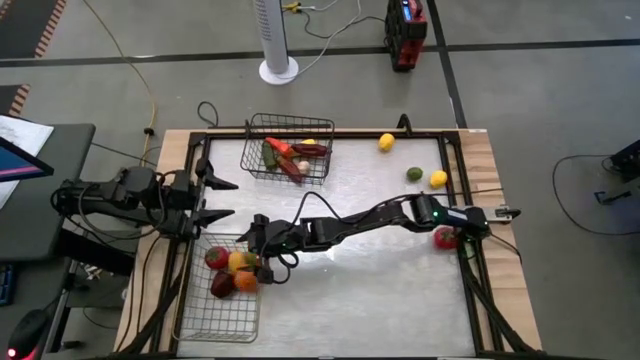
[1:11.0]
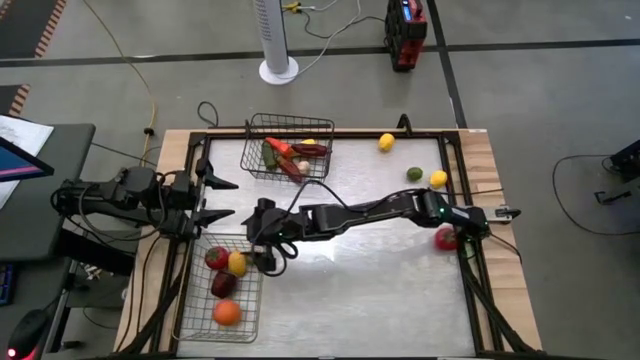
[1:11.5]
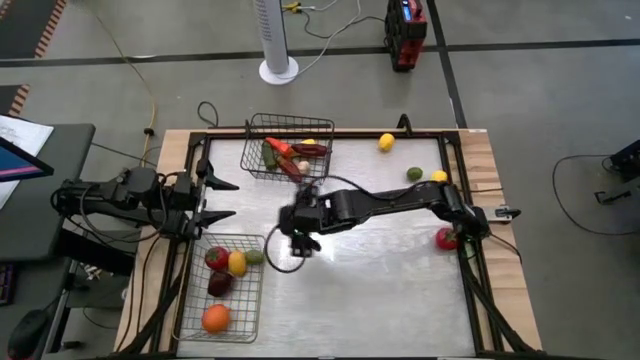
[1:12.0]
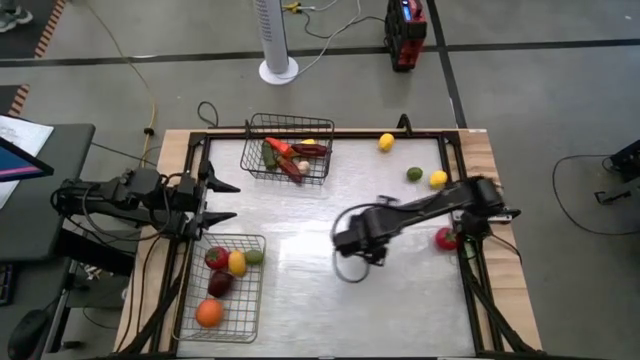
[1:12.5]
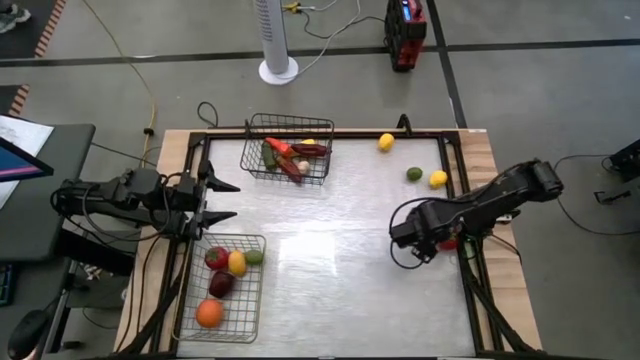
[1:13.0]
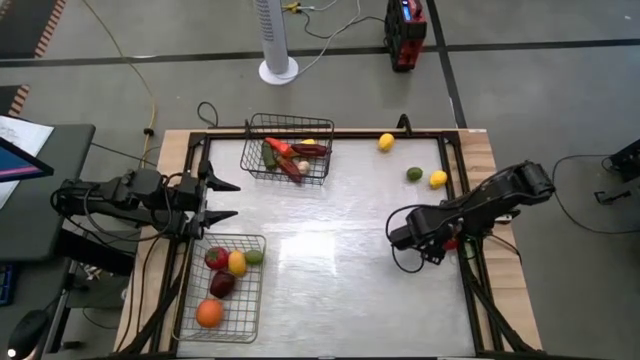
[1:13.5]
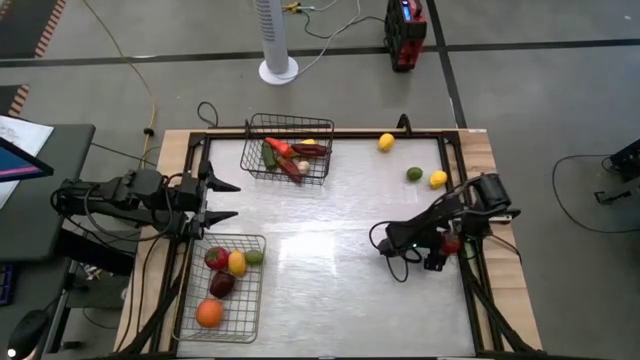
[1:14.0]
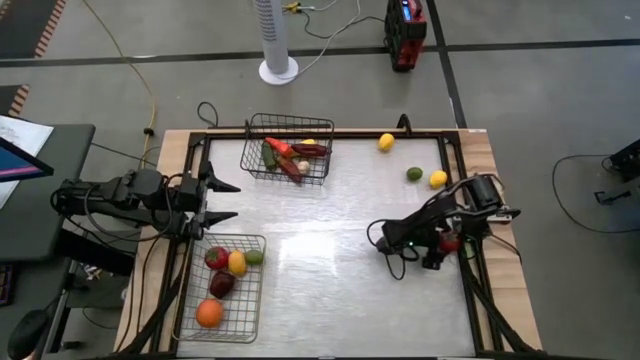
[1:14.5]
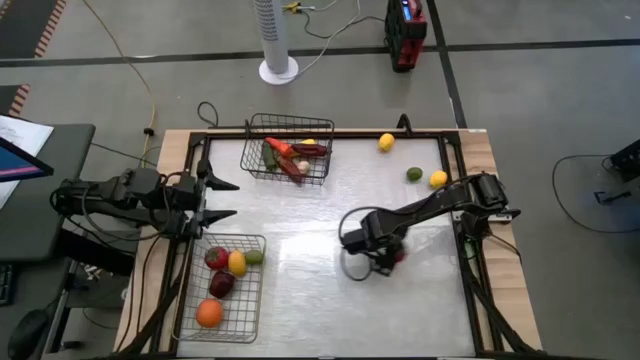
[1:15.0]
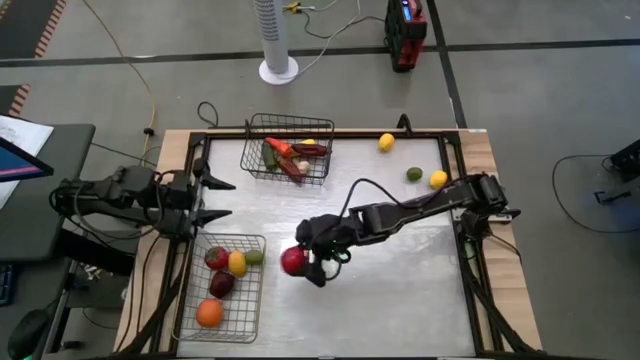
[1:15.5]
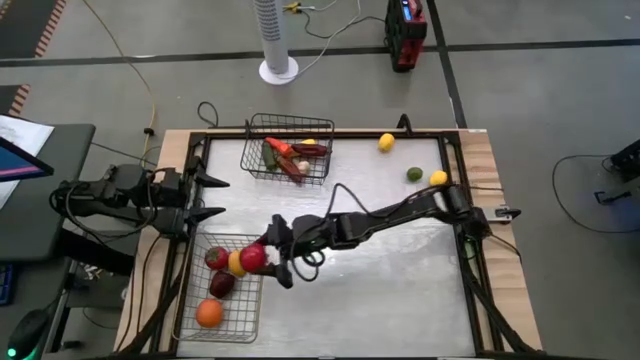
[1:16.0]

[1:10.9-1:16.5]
Task: Sort produce into baskets
Put the red tomato into the silver wire basket

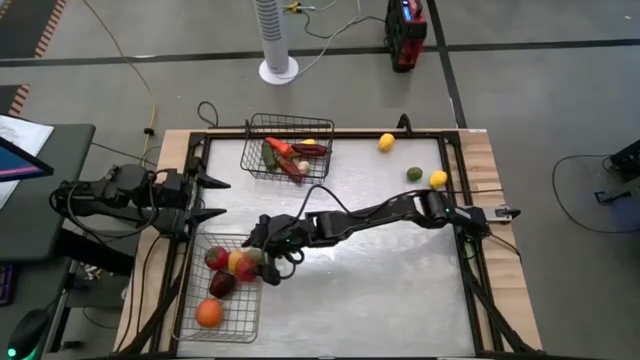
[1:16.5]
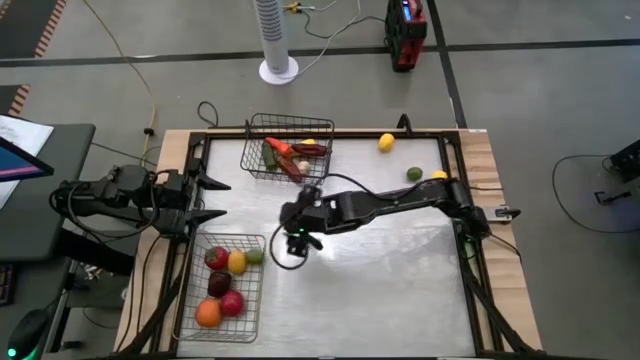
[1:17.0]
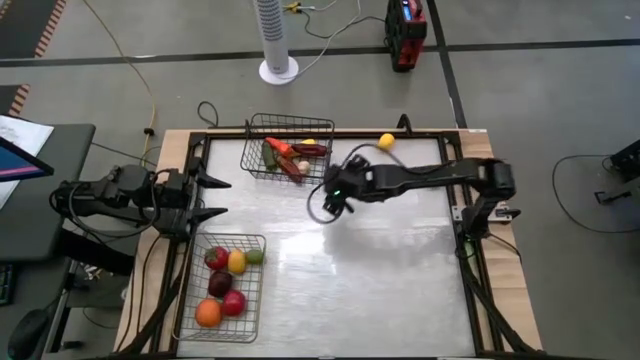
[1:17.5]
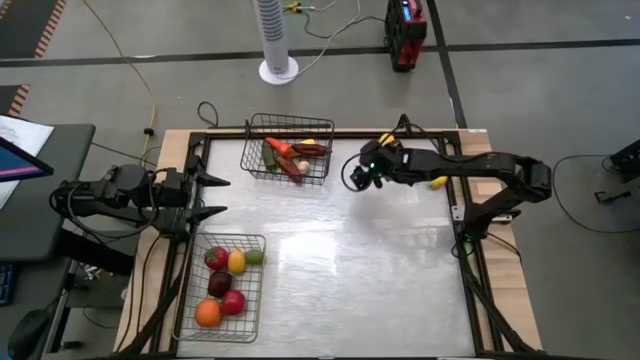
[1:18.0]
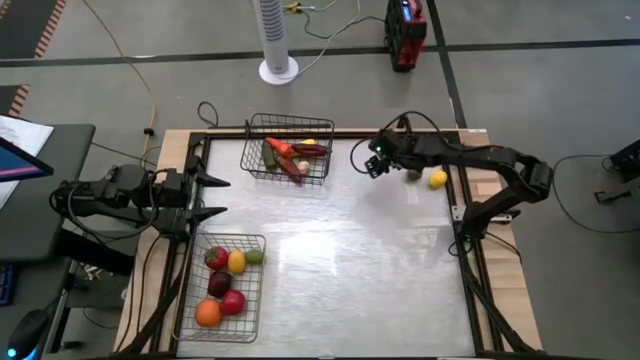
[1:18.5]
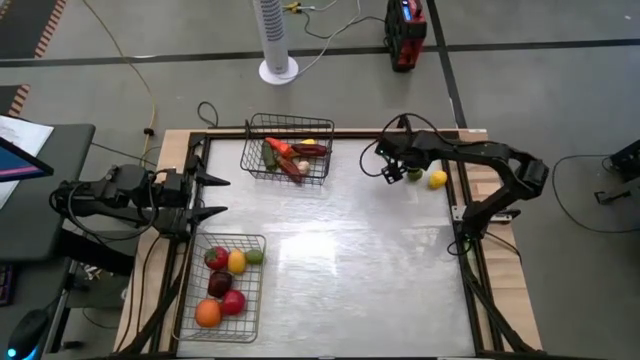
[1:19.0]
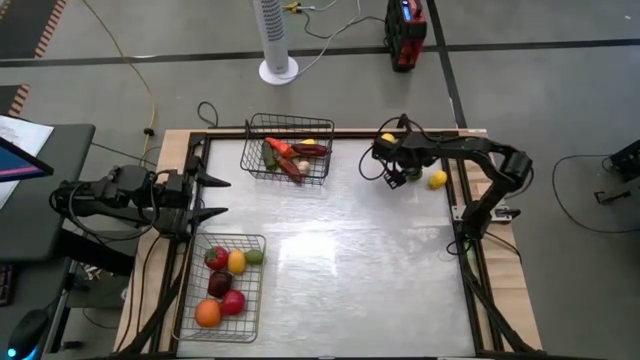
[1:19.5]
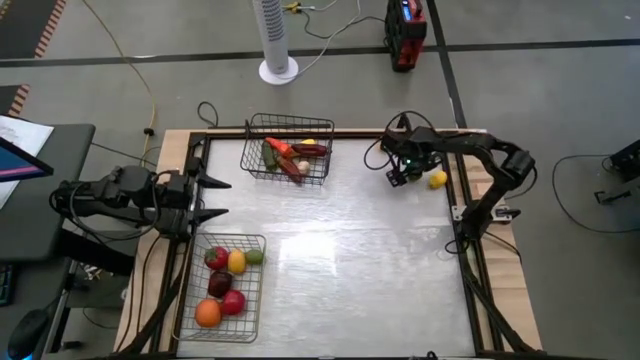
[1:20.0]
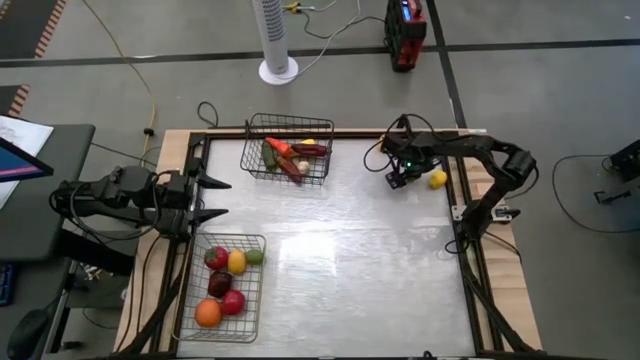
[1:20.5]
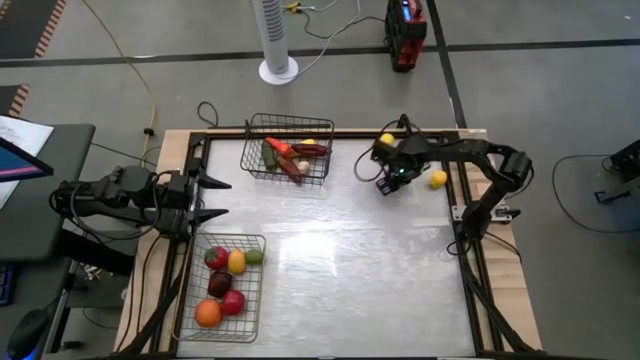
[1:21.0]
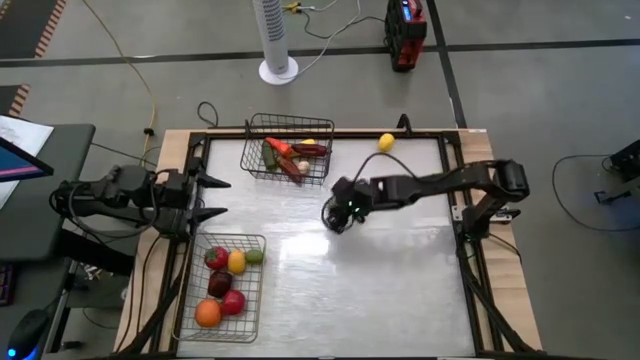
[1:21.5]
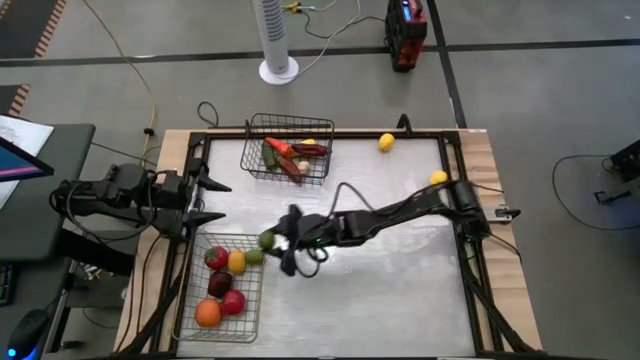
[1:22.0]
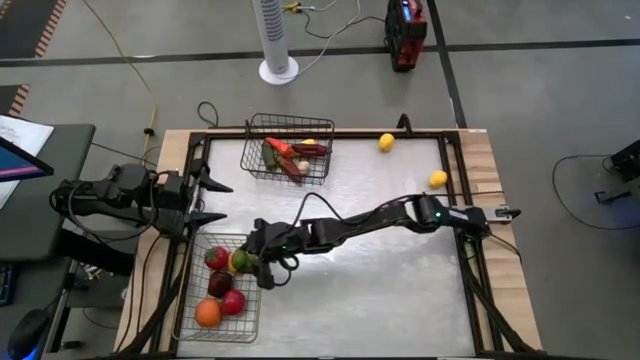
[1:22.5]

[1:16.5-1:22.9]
Put the green lime into the silver wire basket

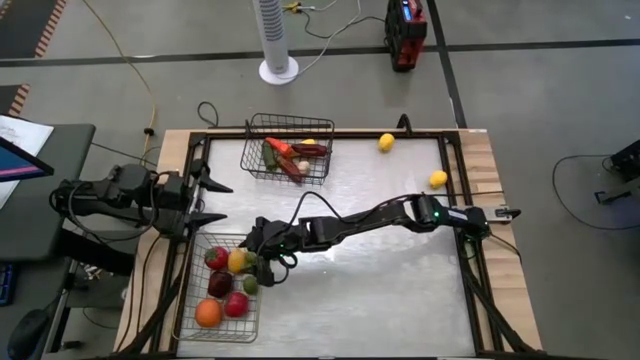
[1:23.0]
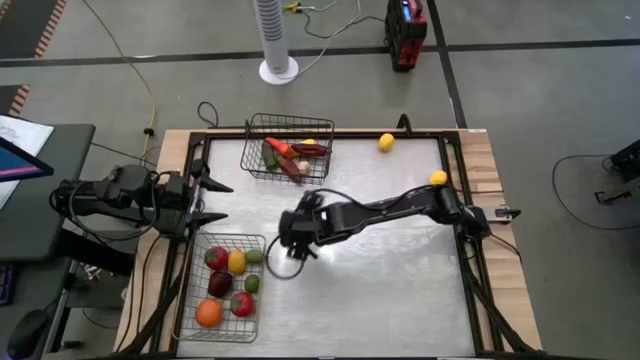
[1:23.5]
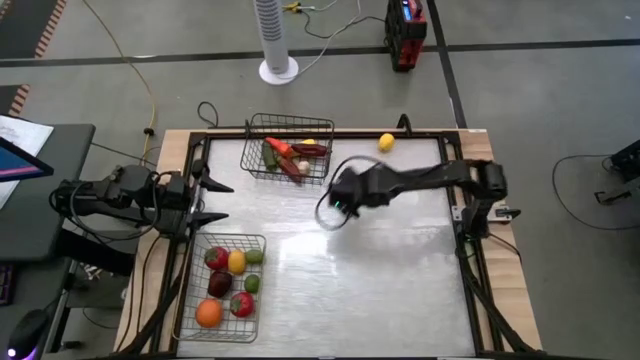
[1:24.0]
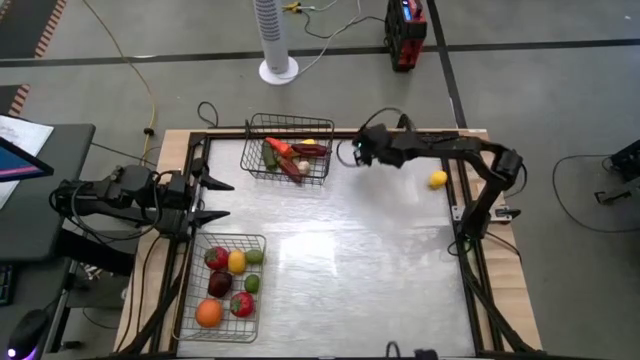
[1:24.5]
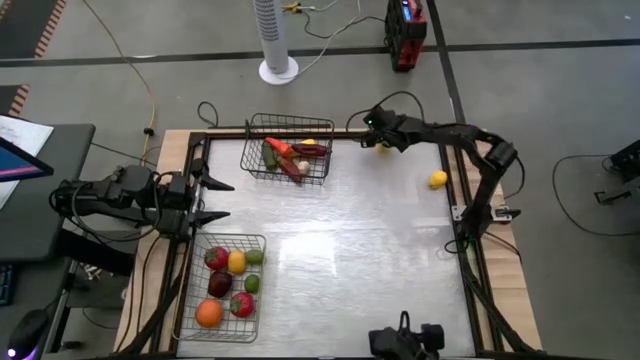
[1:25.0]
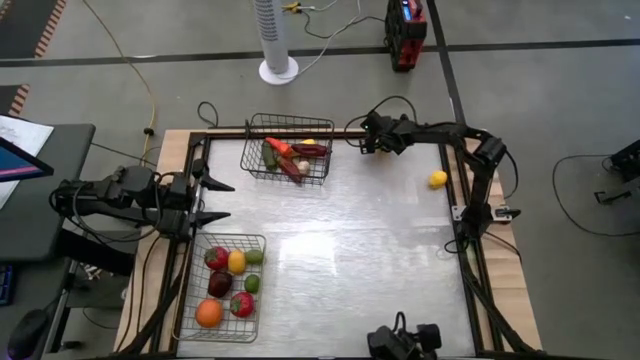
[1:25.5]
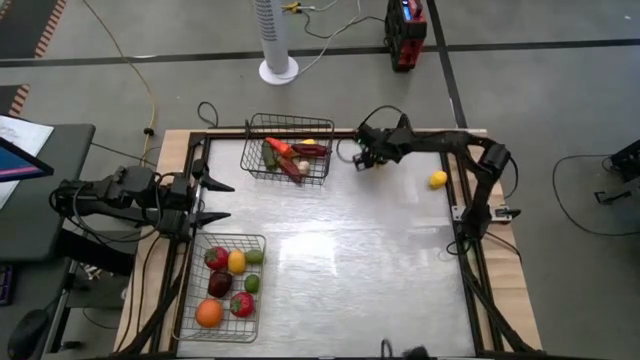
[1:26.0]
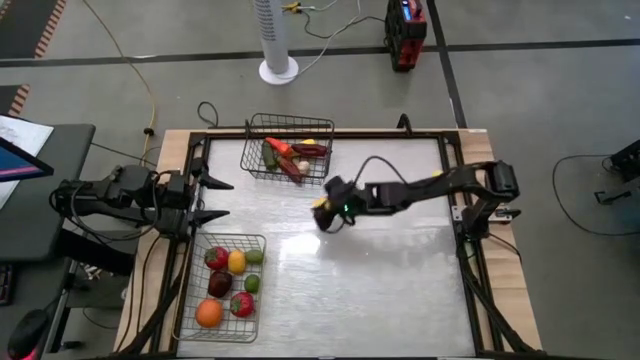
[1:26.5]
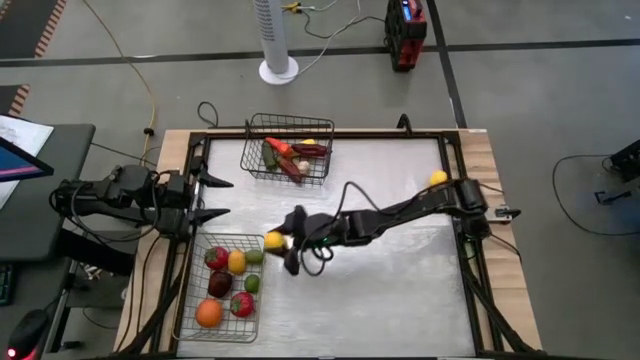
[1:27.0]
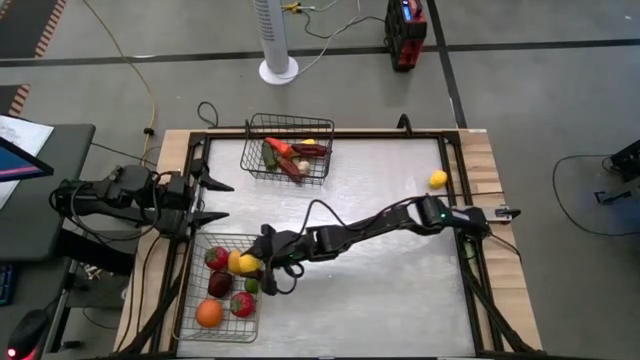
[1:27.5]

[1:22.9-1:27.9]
Put the top yellow lemon into the silver wire basket

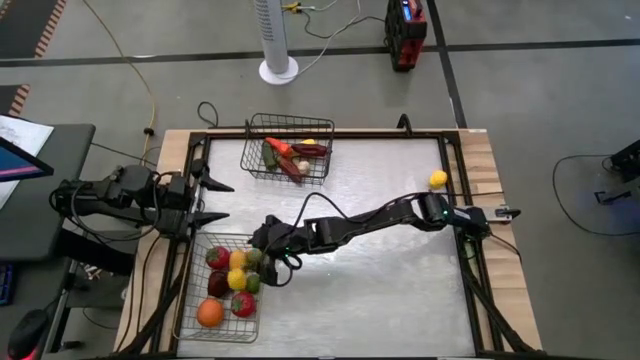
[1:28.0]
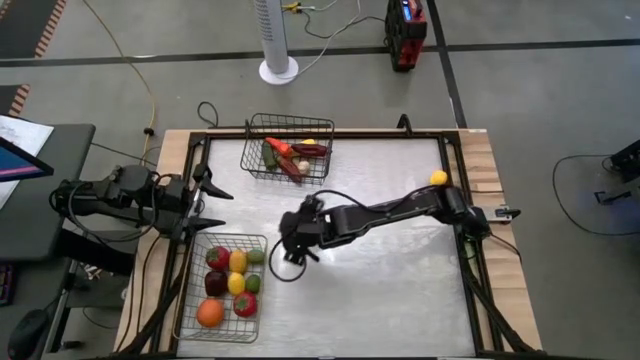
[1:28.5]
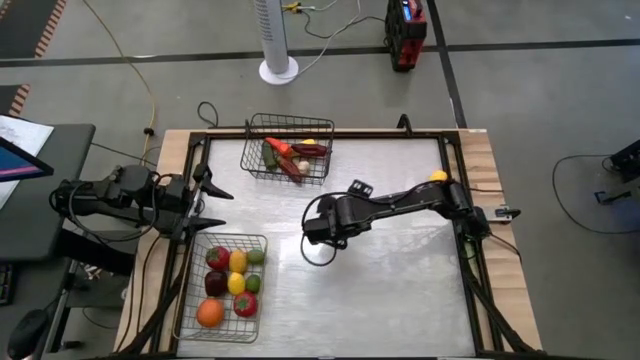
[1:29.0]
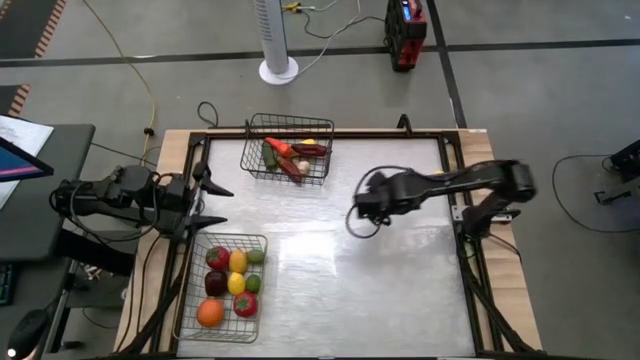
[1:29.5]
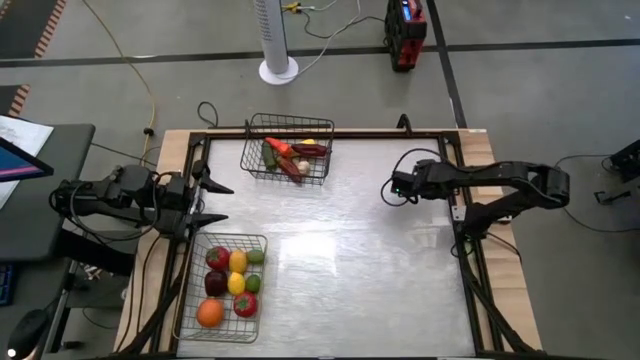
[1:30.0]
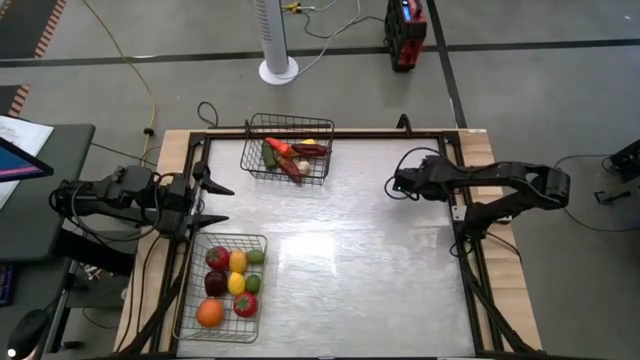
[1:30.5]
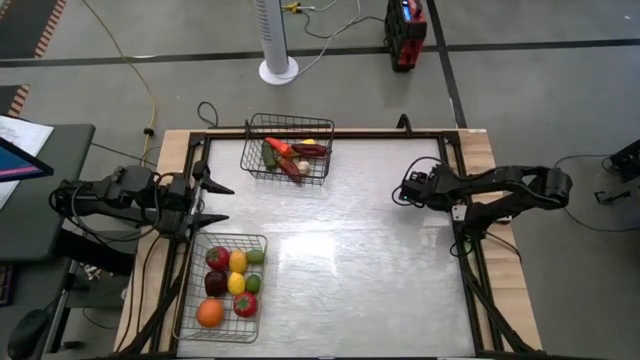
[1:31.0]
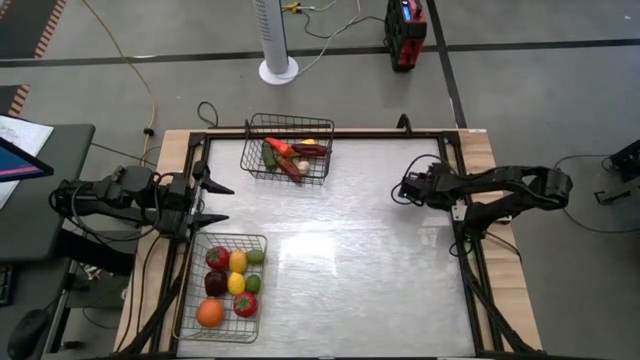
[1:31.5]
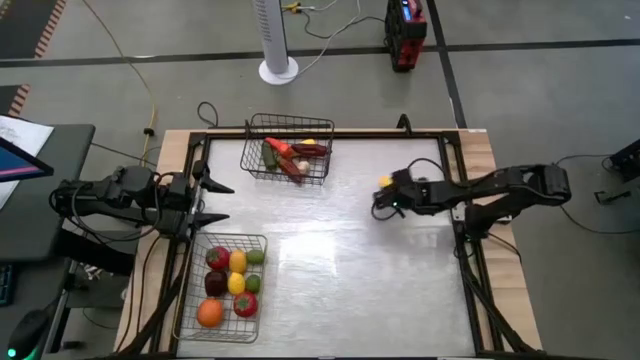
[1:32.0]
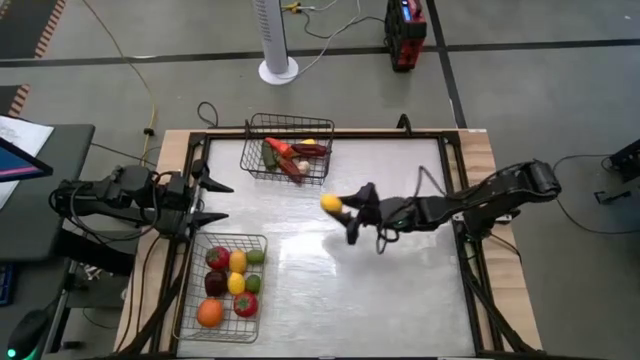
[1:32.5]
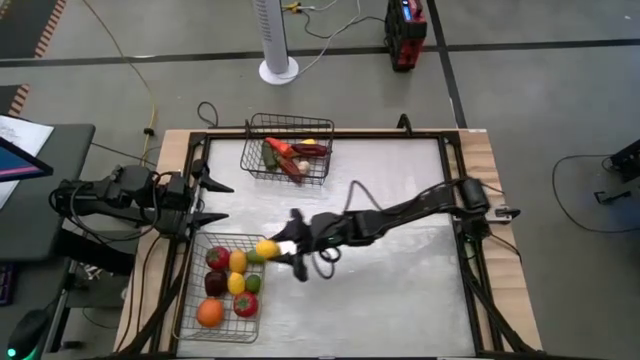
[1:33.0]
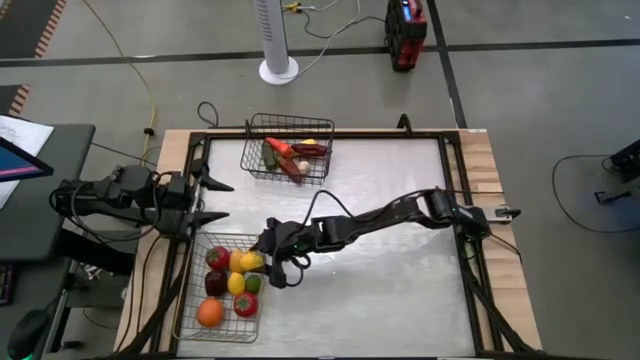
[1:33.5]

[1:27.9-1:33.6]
Put the yellow lemon into the silver wire basket
